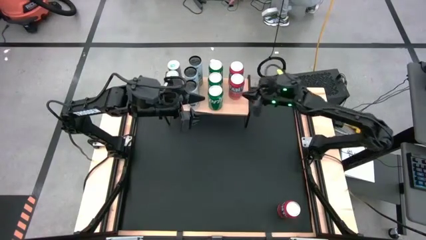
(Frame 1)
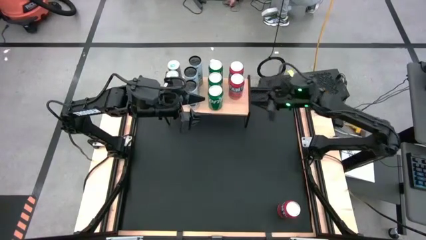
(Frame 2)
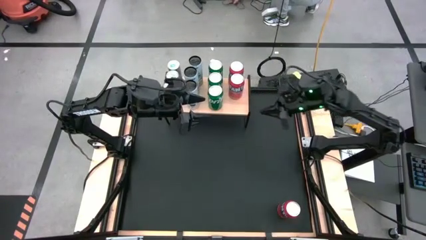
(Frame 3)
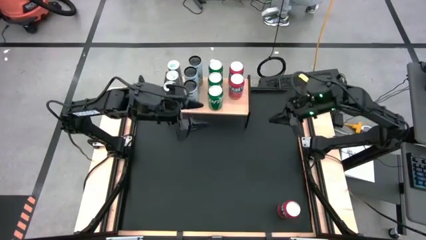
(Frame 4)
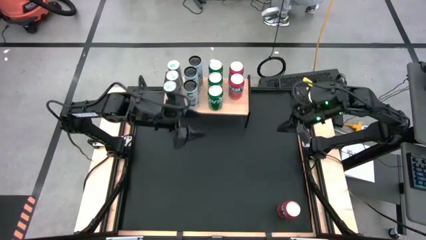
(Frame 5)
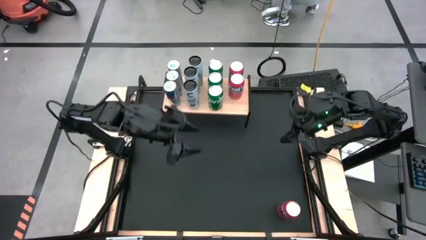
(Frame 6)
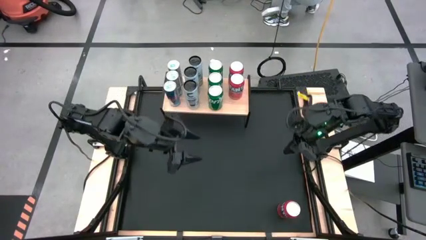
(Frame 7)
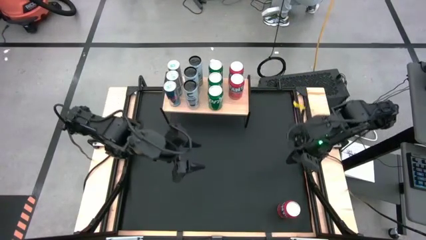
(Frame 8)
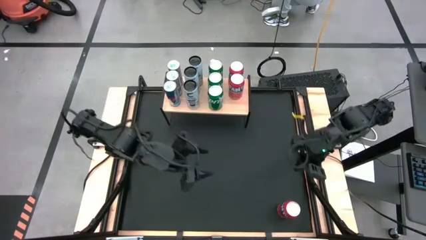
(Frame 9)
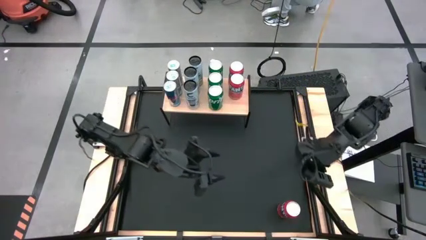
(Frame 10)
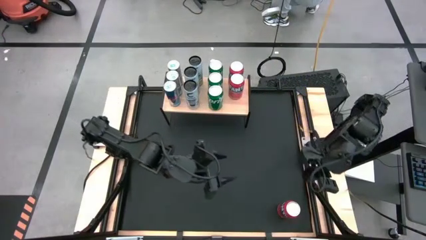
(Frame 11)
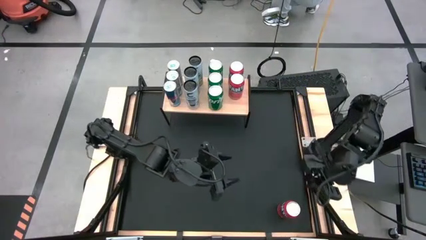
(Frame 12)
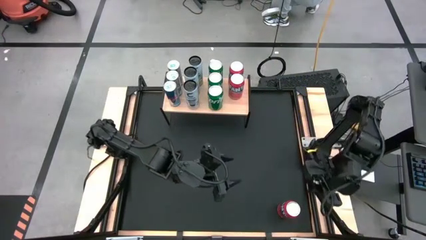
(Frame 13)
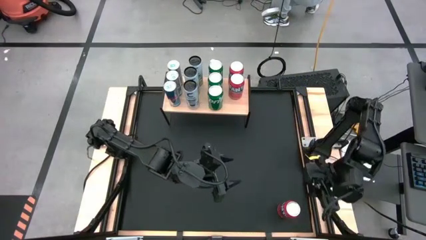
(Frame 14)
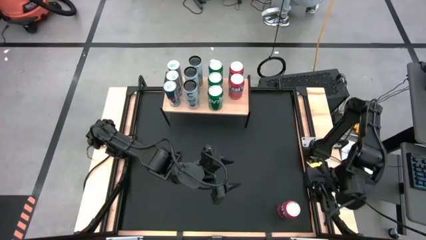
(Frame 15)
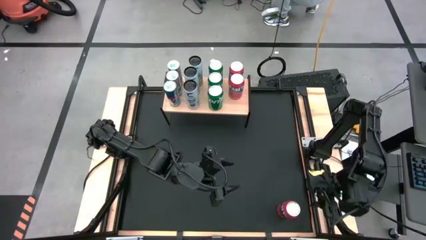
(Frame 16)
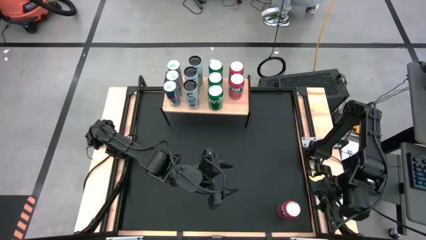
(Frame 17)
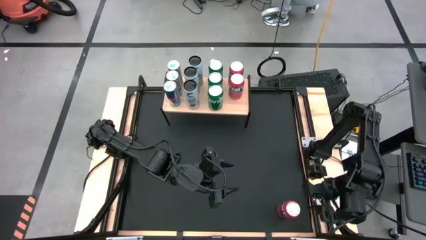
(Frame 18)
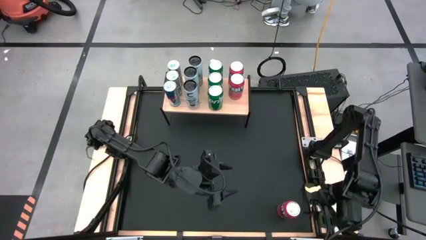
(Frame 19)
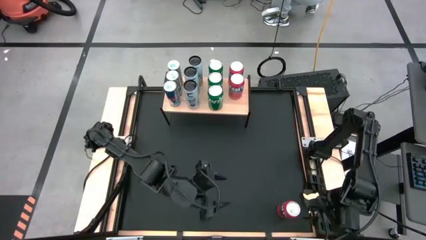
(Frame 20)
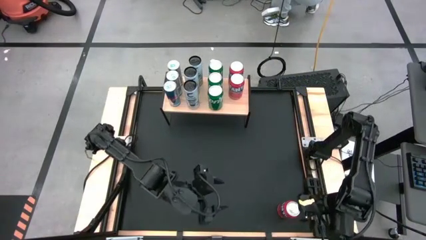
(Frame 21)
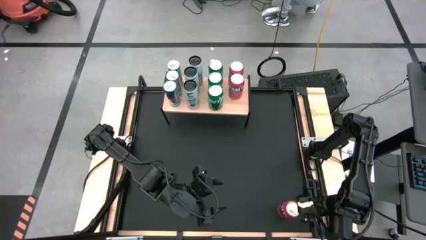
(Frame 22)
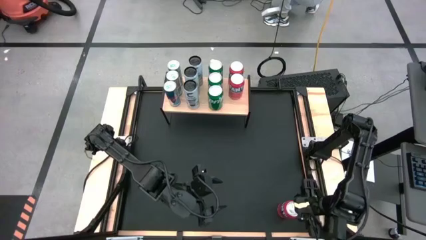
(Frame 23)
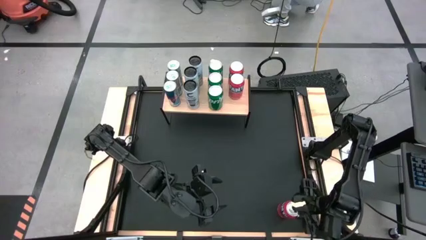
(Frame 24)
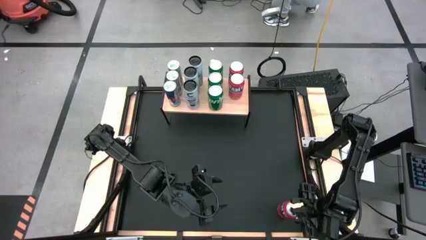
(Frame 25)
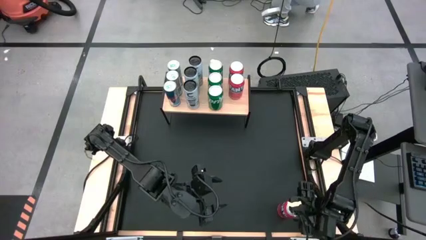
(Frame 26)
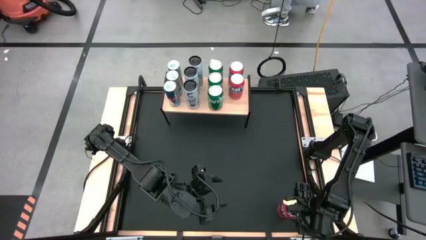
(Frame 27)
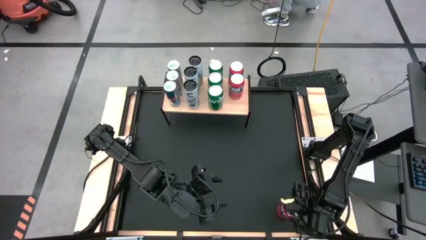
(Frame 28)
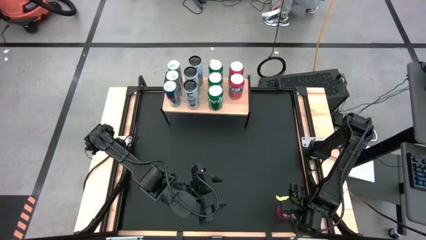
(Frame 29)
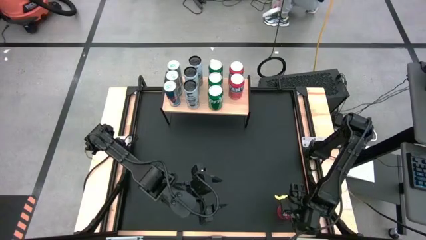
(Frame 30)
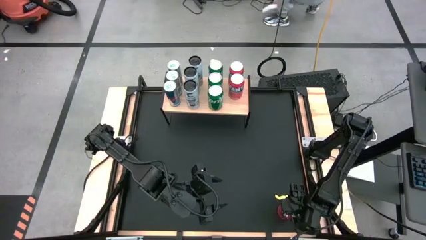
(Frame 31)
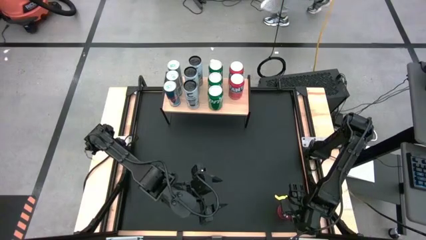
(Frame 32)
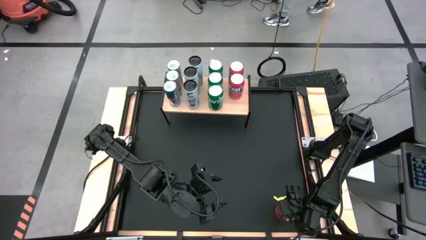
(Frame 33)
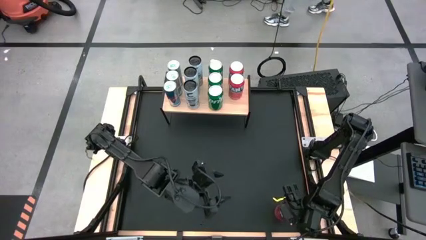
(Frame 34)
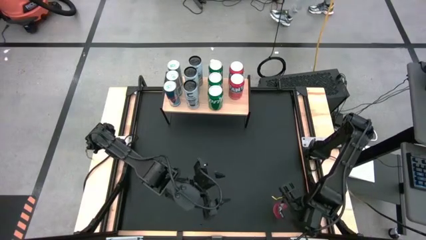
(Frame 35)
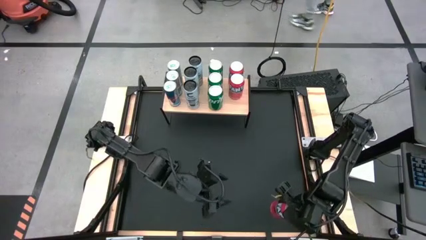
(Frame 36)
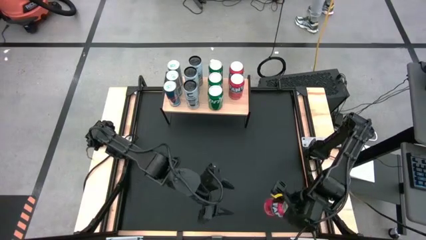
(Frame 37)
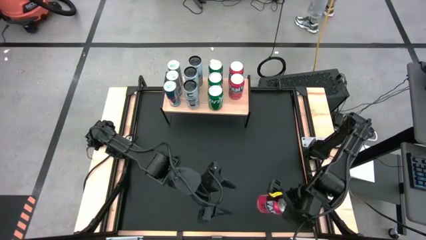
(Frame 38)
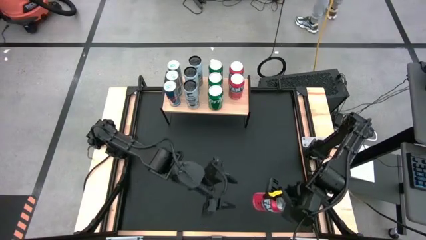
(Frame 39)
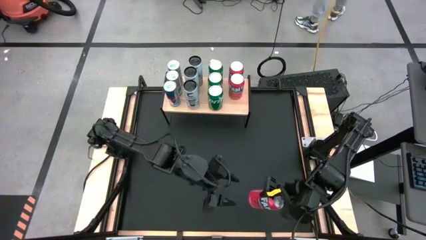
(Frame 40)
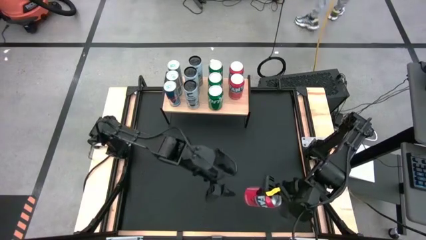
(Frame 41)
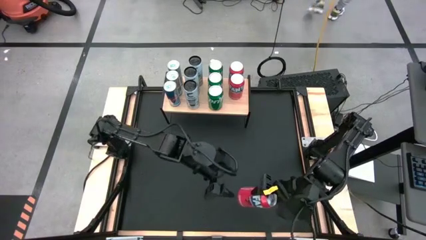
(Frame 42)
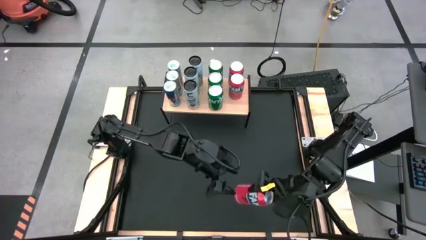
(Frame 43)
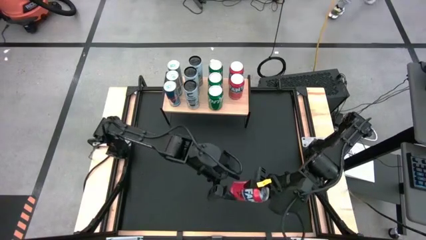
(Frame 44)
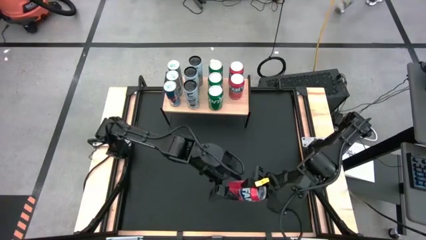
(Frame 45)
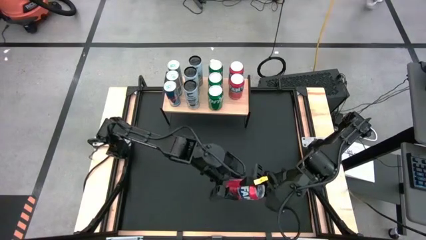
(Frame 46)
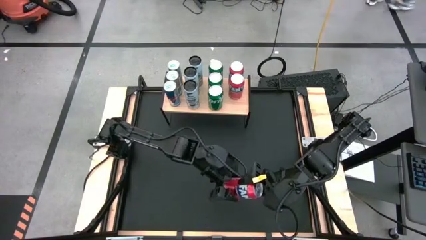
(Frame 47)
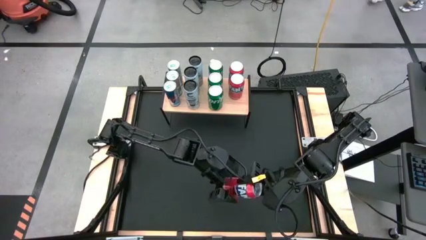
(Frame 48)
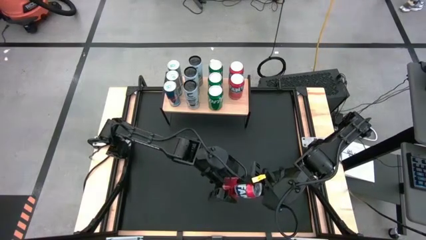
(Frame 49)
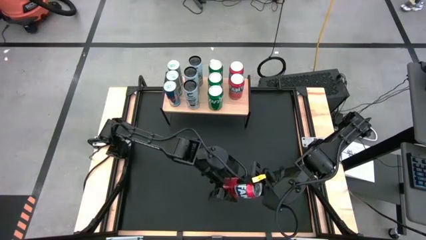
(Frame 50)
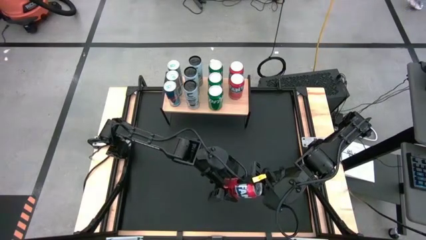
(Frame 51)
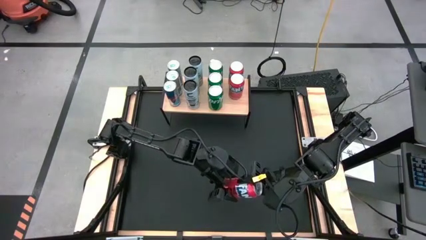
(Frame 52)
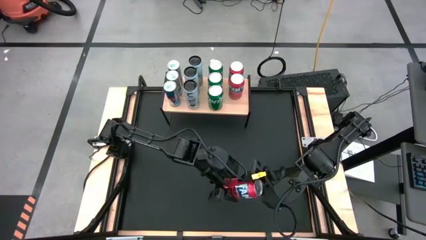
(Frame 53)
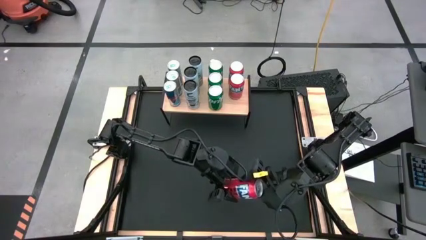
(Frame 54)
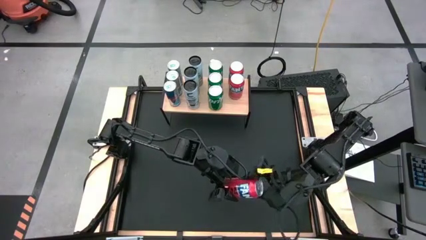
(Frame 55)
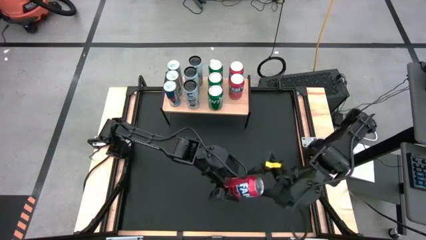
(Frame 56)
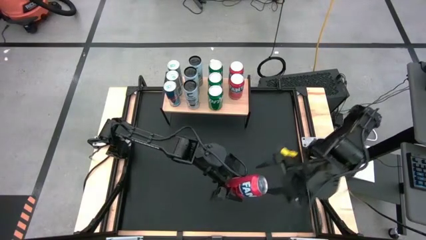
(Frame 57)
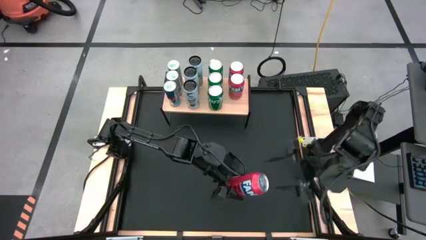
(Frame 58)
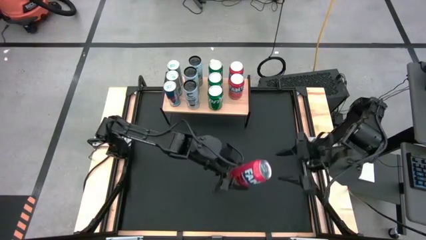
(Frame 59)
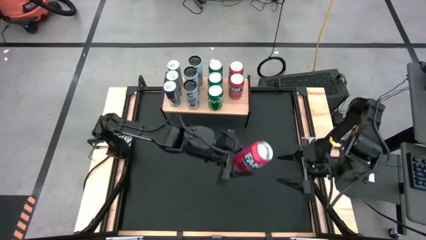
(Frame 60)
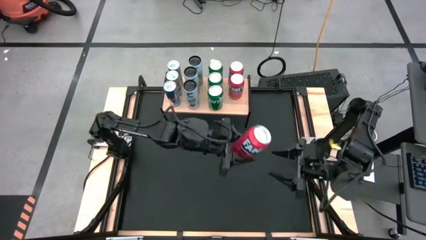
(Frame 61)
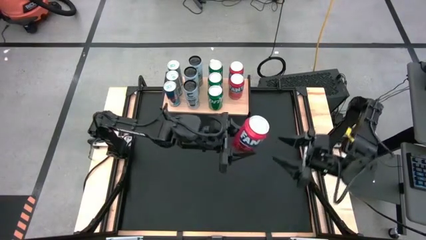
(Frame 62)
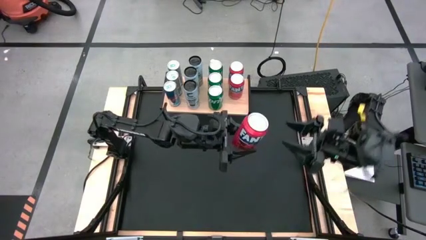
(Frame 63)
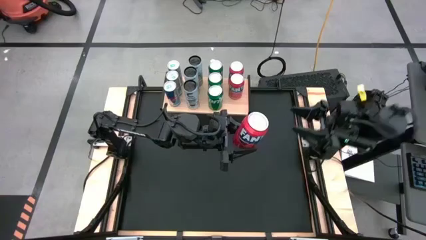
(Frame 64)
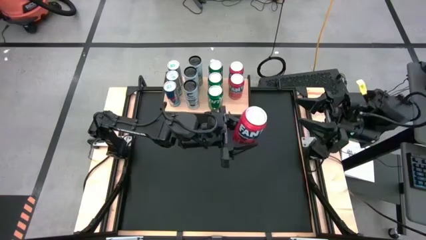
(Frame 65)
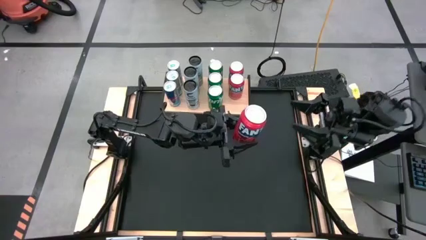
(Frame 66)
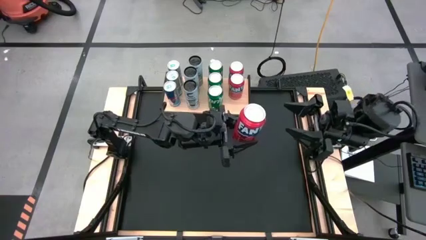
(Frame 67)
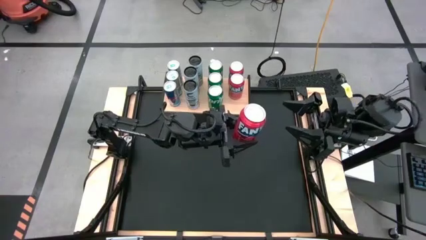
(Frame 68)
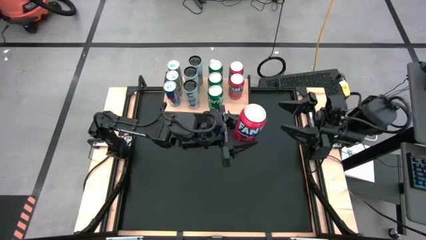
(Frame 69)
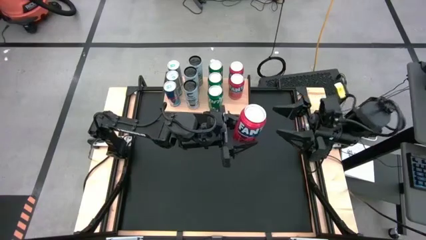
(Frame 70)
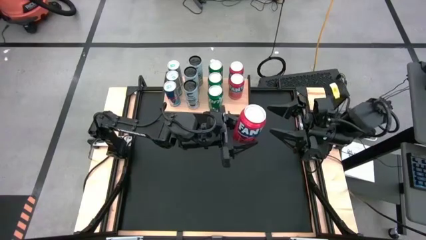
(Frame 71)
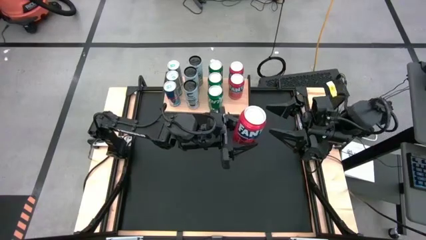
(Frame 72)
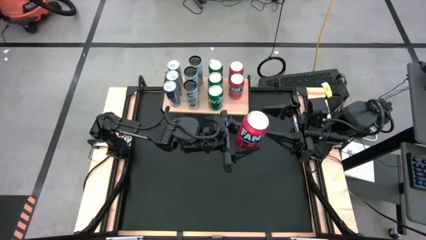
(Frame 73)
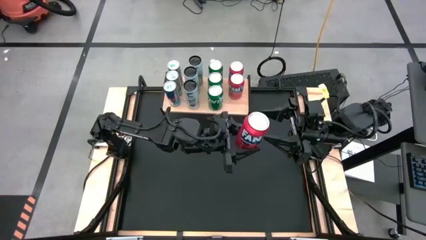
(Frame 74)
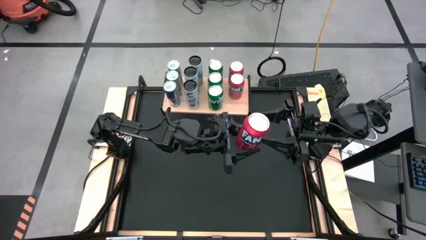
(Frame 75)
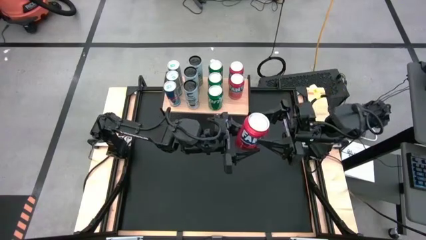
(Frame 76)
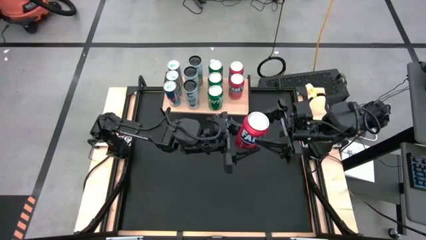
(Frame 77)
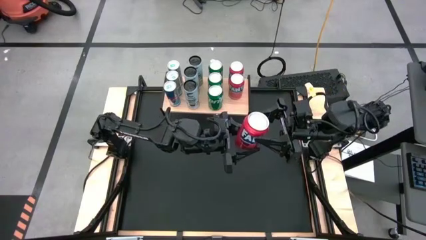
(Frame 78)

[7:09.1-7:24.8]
Task: Place canned beverage on shelf
Put the orange soda can on the shelf
